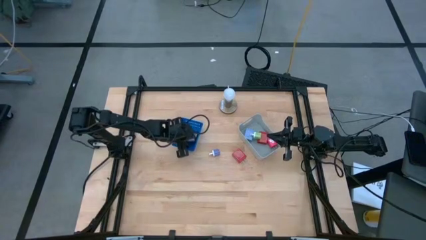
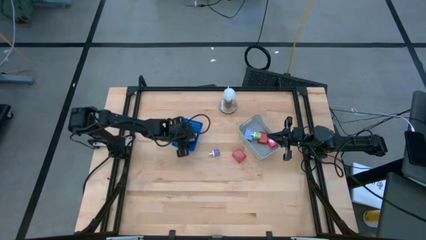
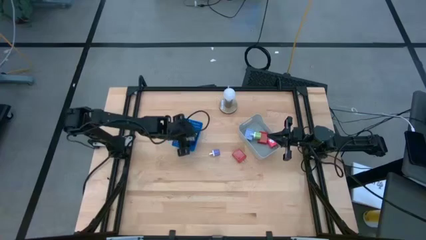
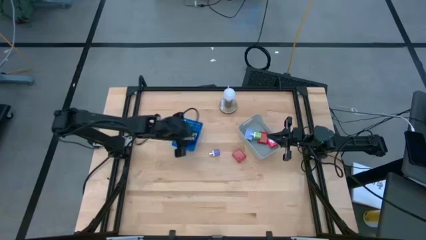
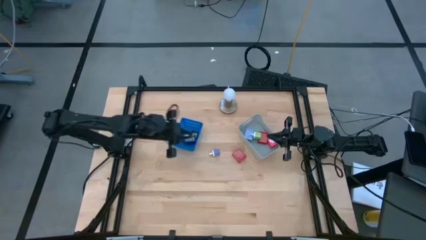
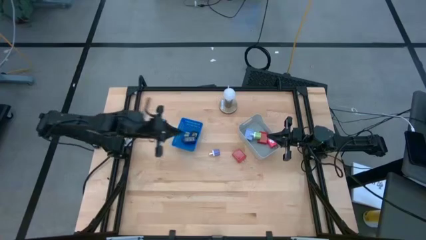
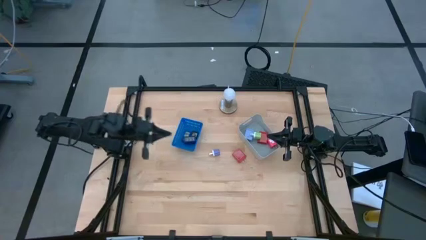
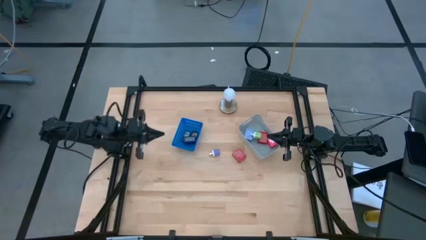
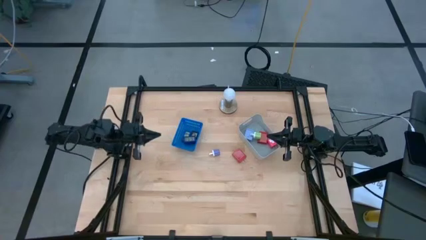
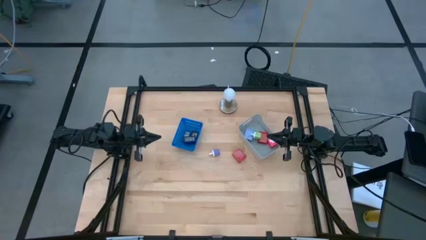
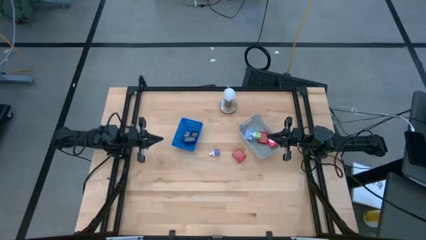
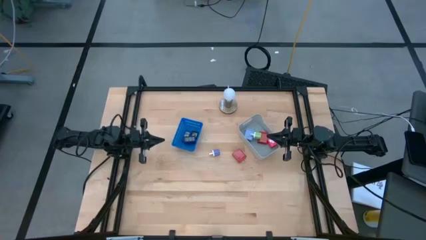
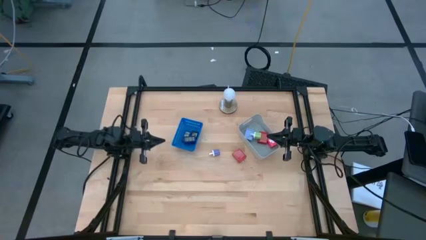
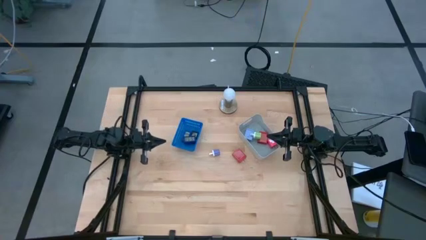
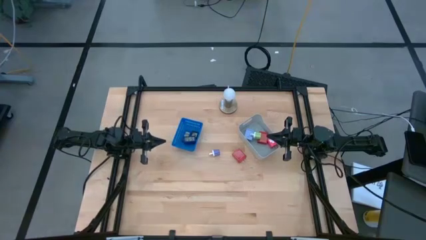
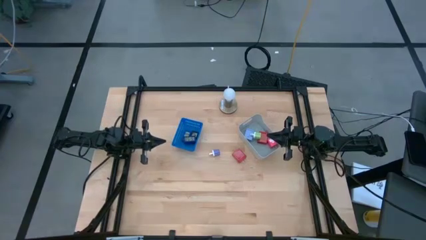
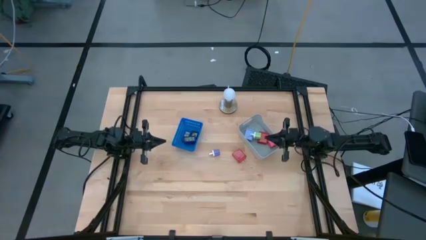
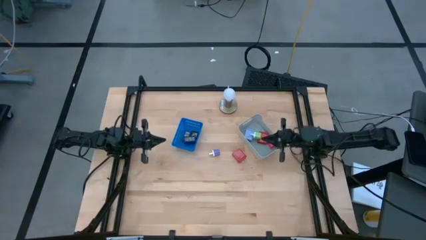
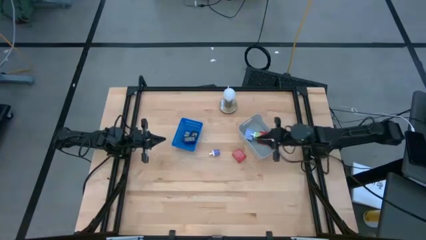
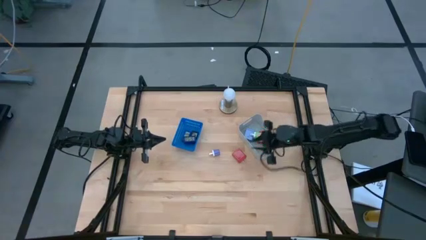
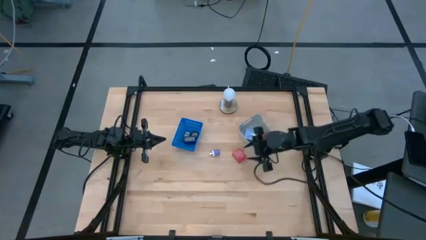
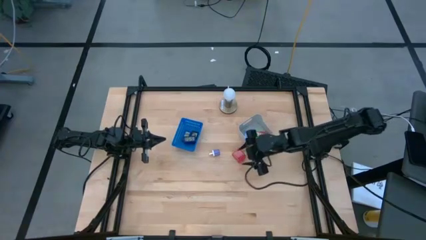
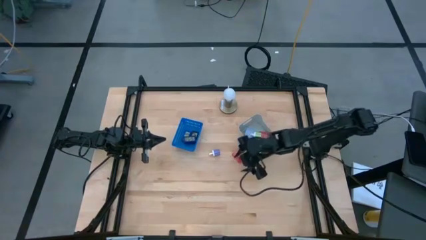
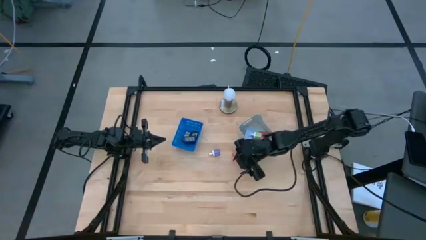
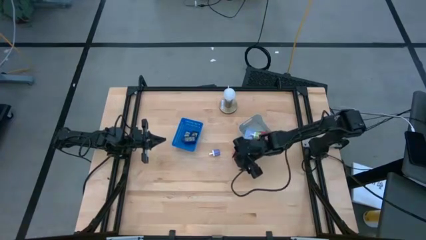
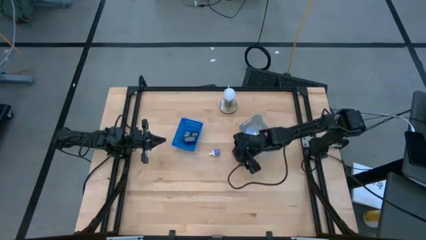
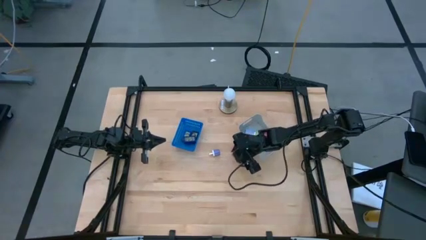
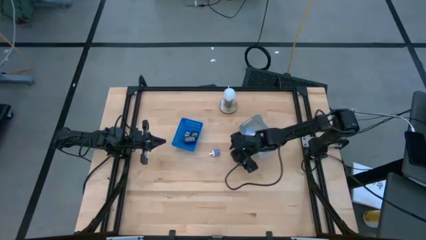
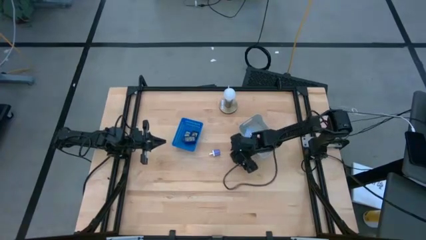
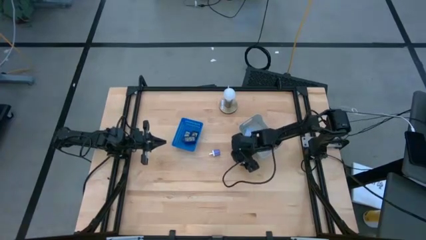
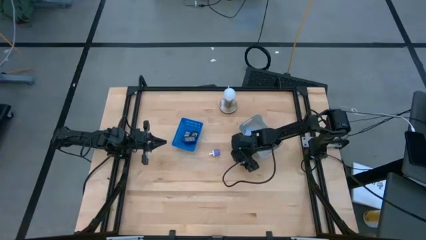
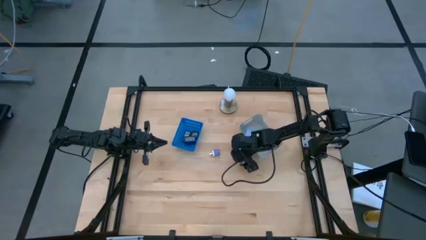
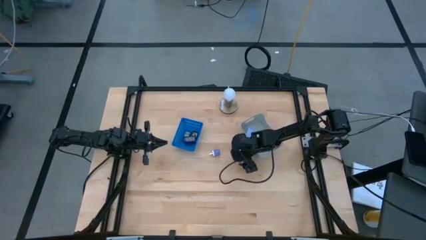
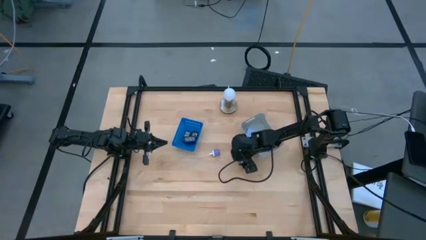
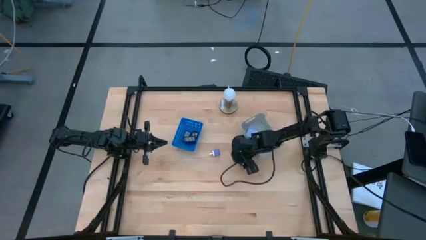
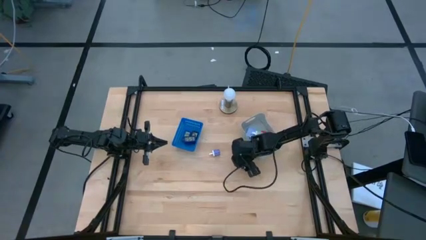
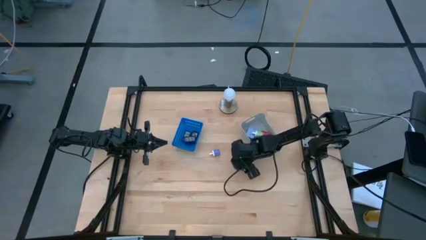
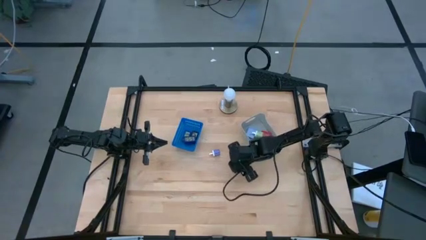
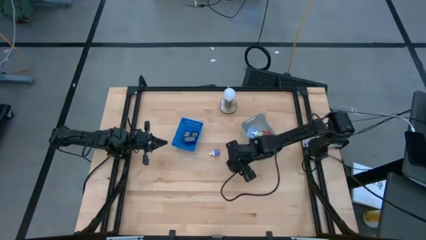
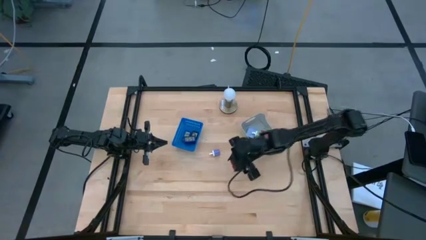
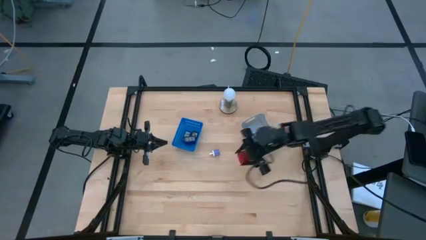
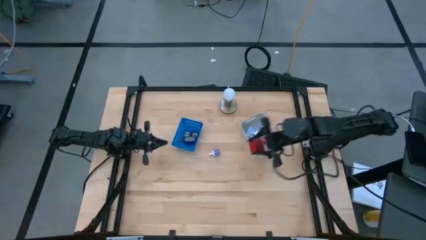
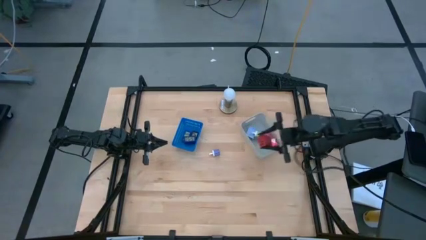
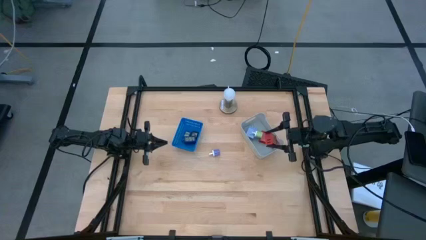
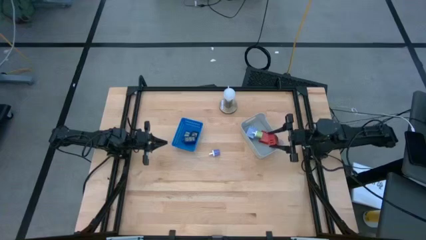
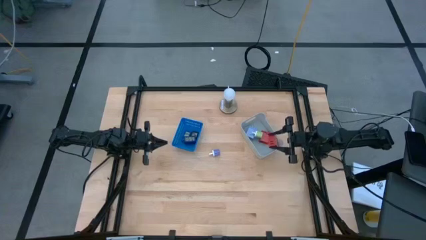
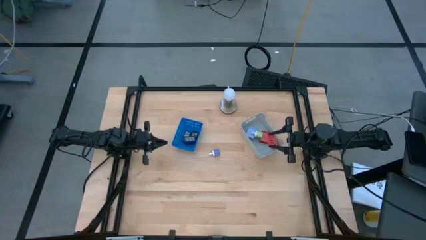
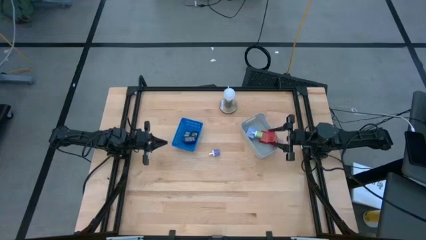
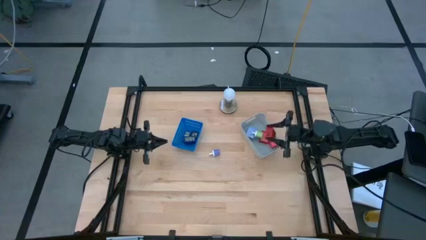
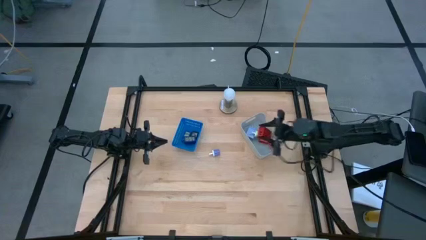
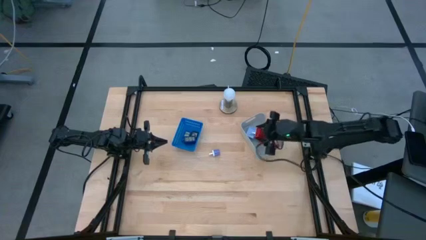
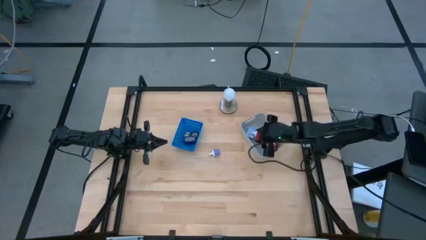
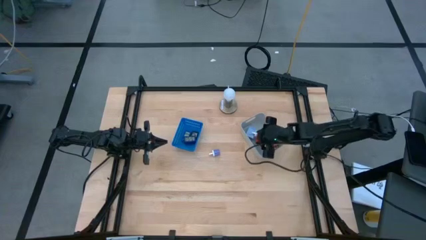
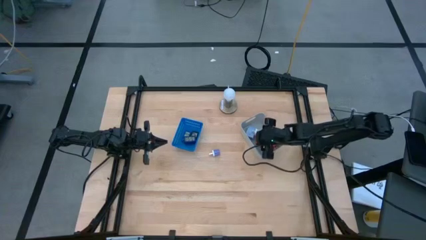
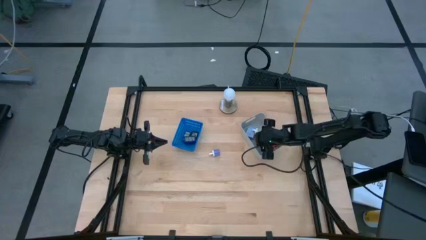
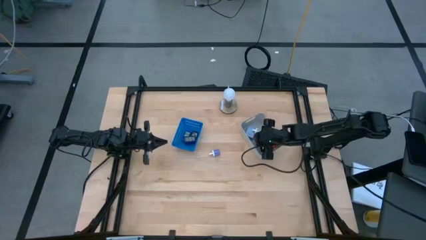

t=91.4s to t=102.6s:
Task: Pick & Place Office items
Put the red charger into the gray bin

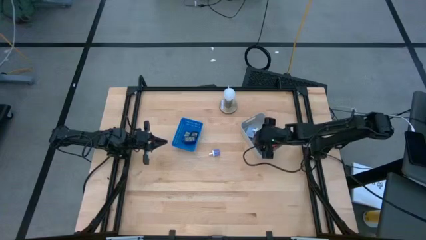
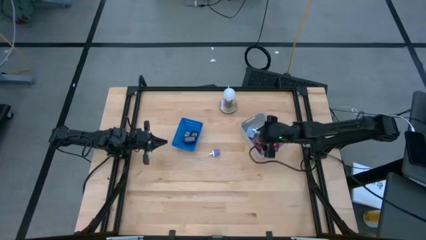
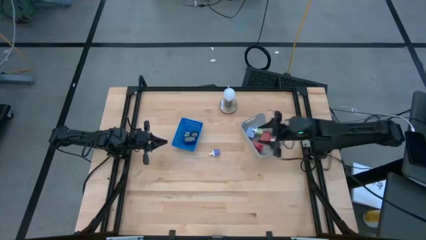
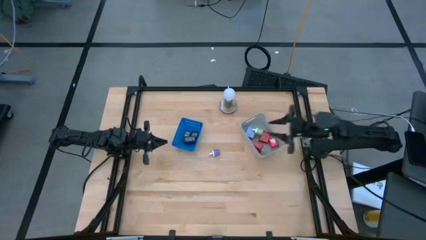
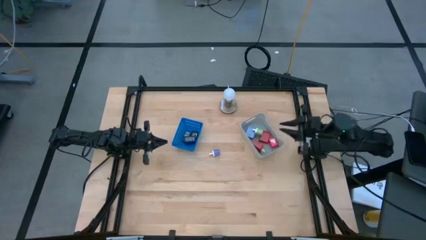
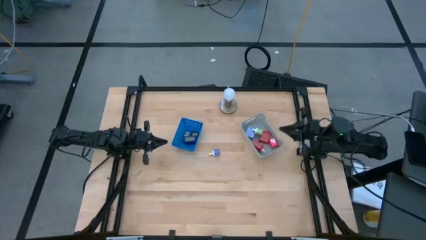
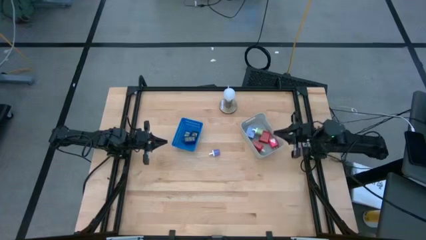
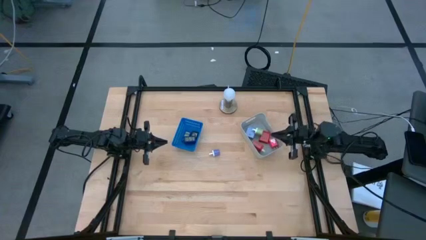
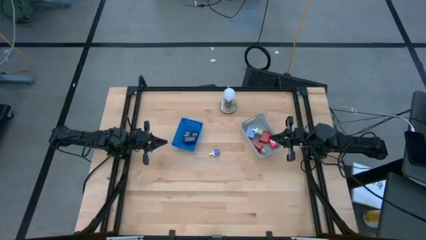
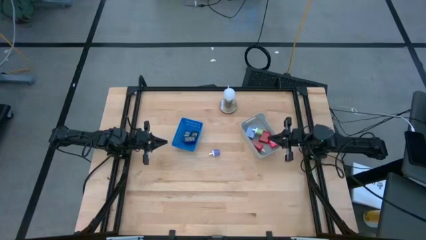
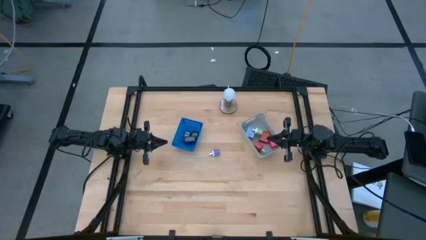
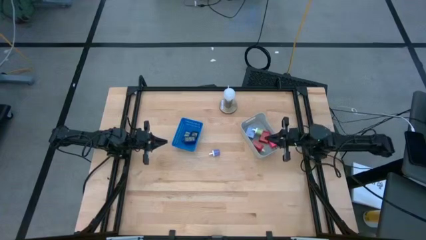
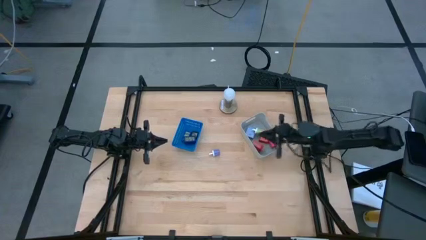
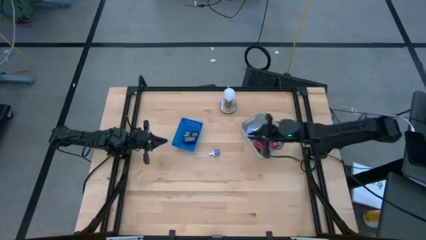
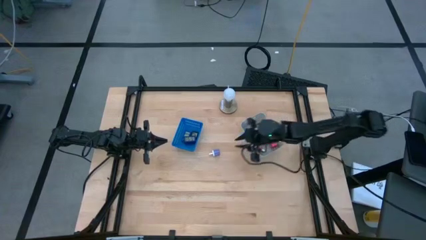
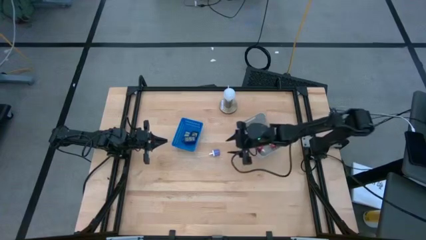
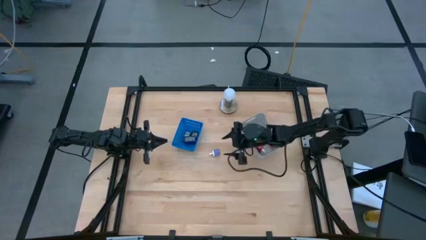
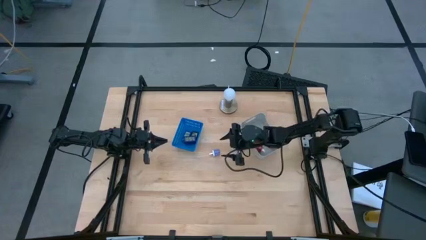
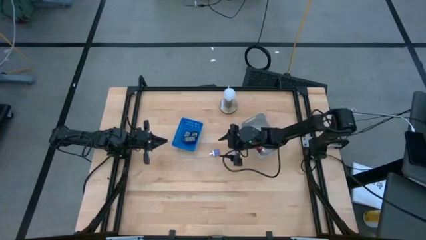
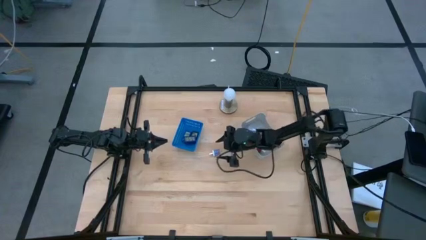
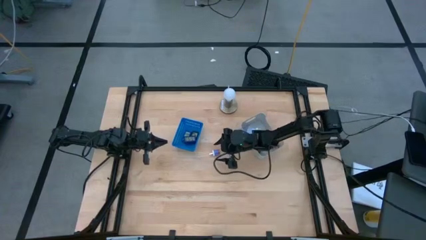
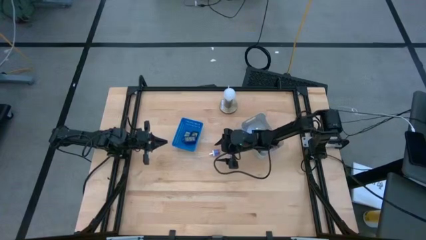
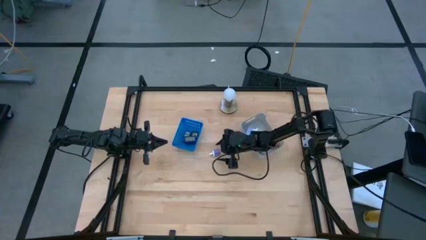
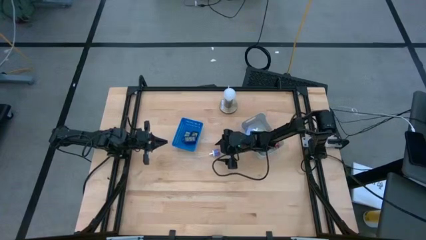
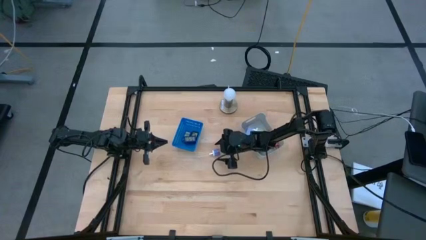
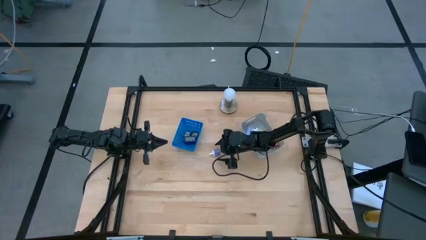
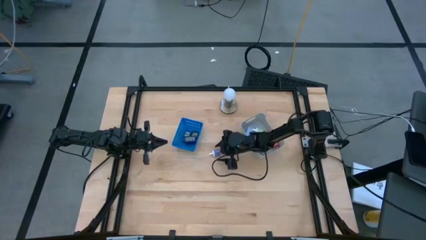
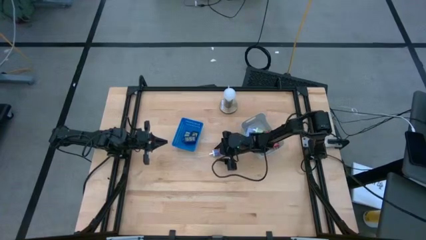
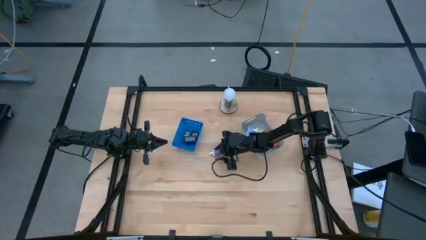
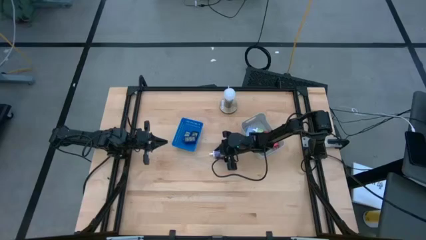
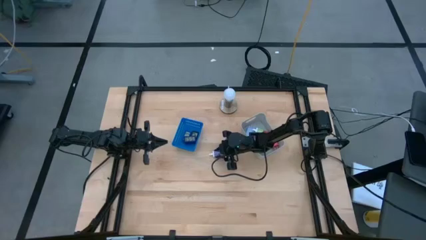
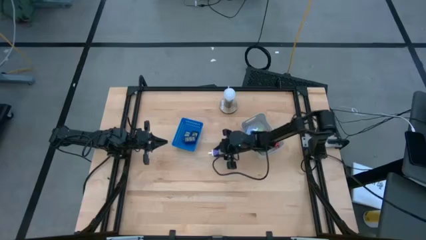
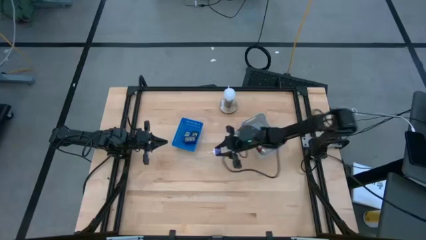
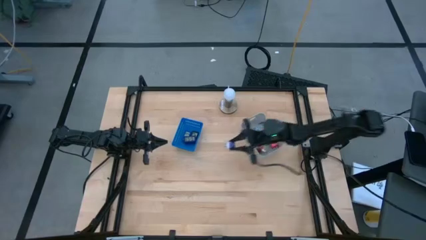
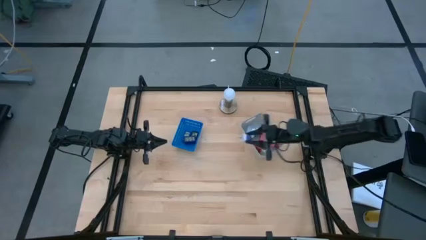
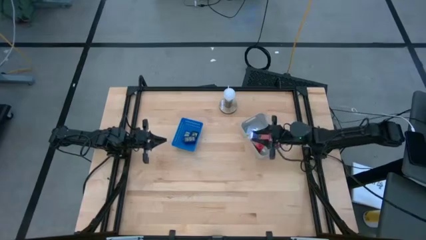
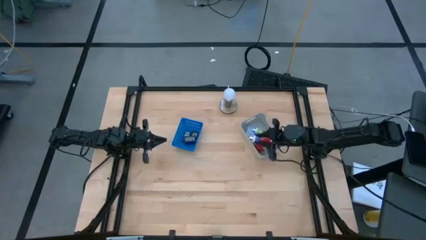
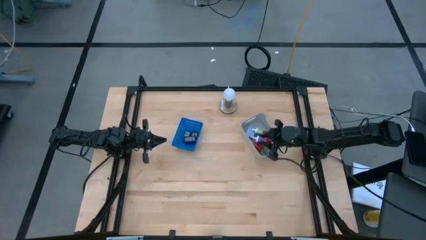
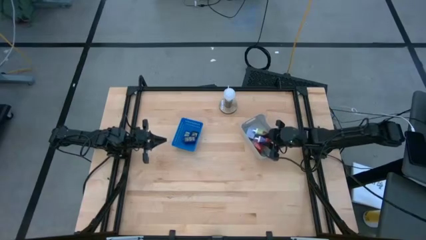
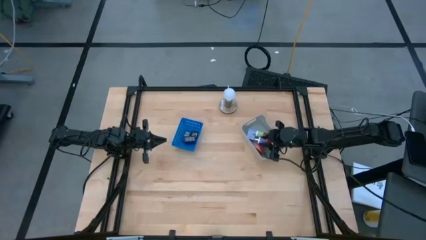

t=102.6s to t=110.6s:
Put the blue charger into the gray bin
